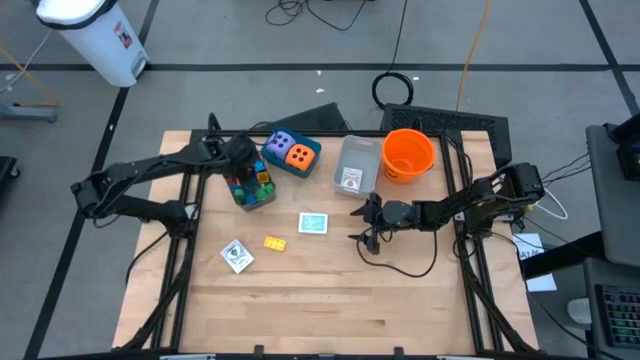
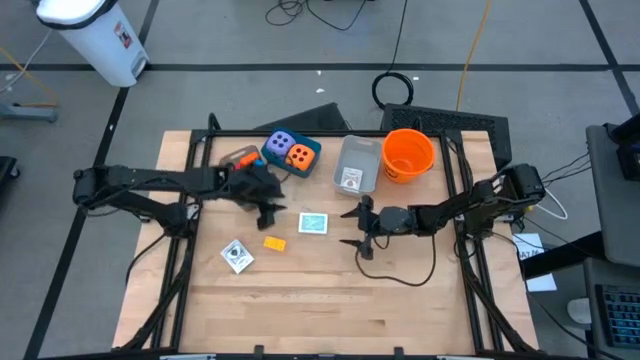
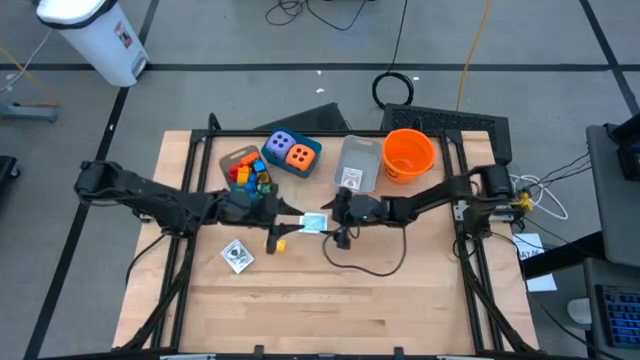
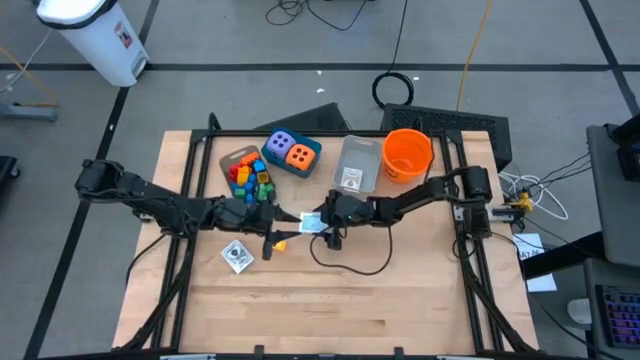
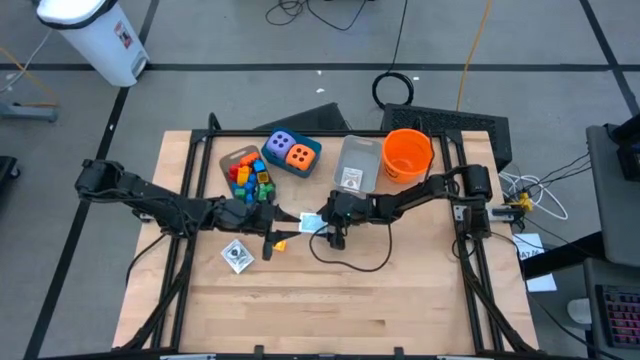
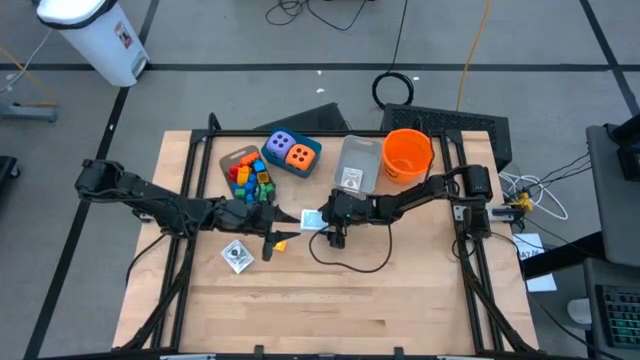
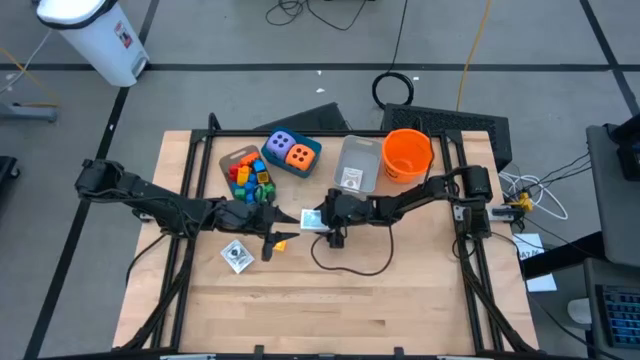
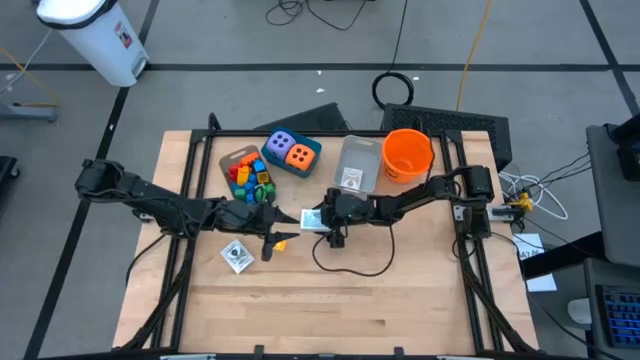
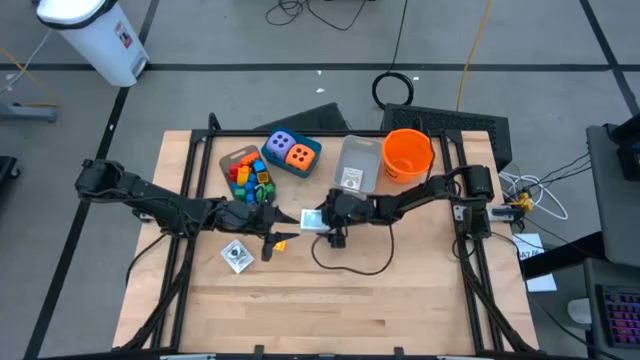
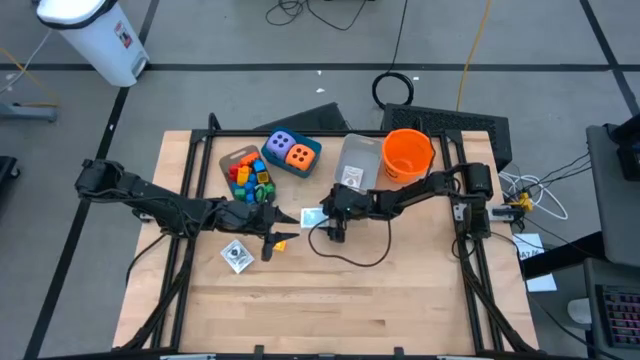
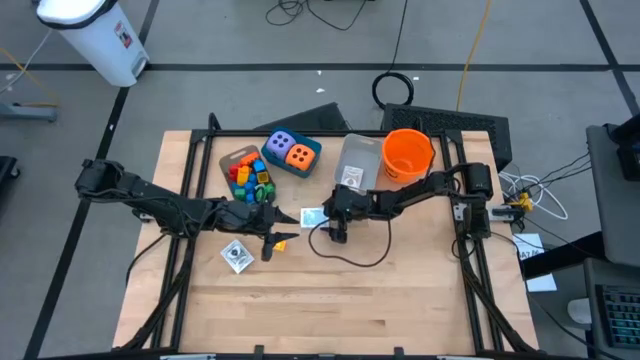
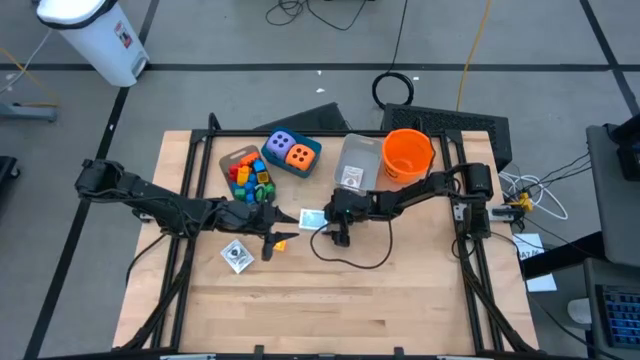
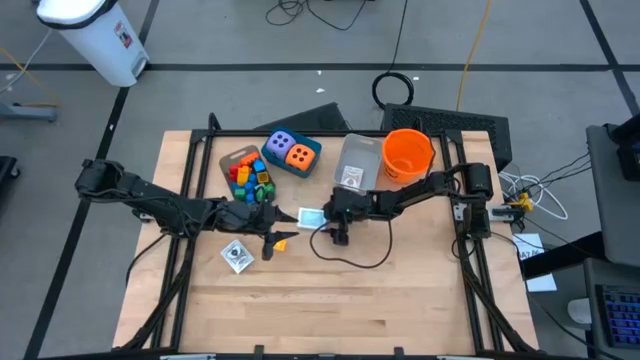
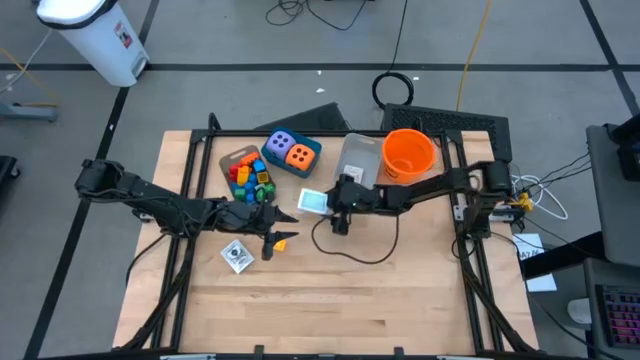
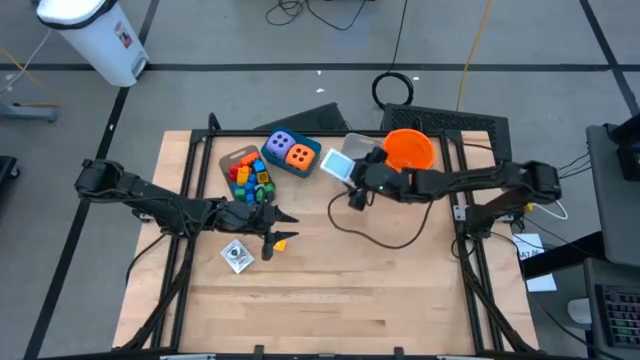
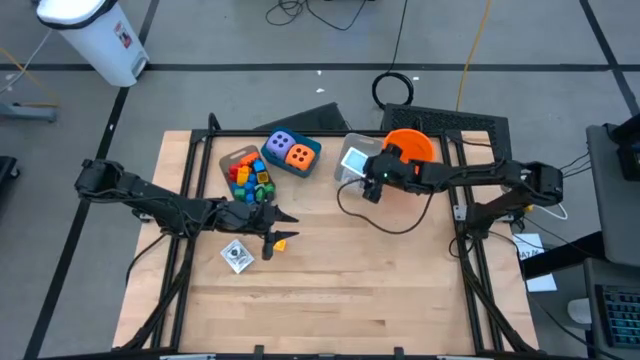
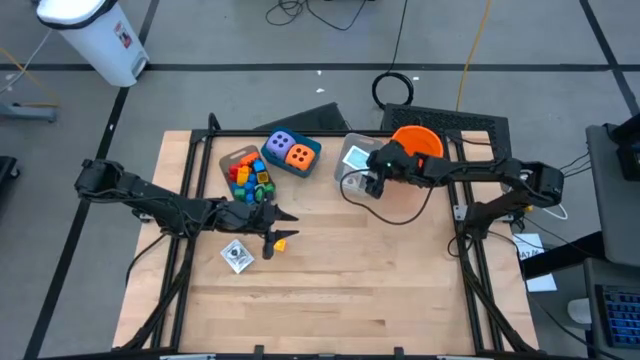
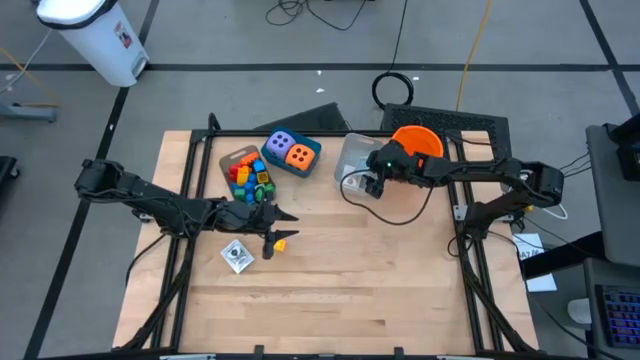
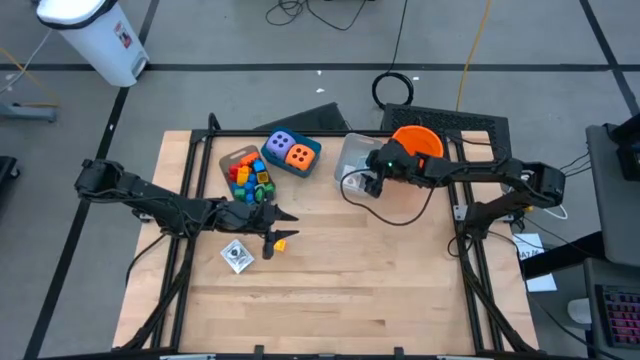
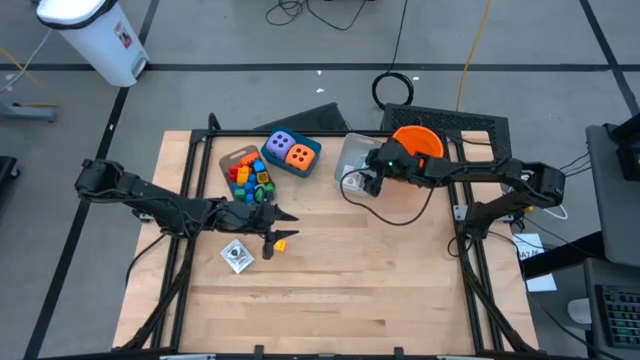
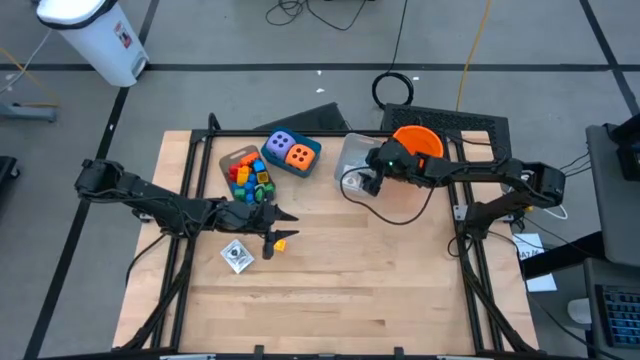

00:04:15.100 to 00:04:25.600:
Task: Pick & Place Toys
Put the blue deck of cards into the gray bin

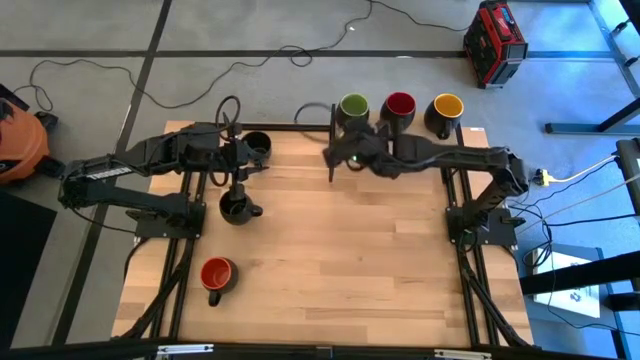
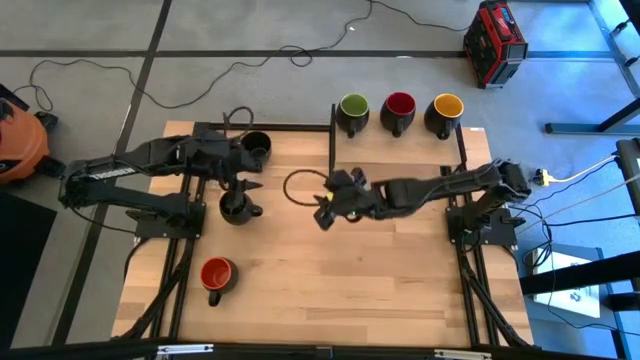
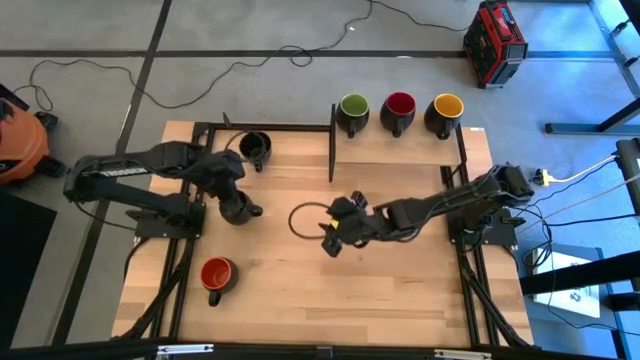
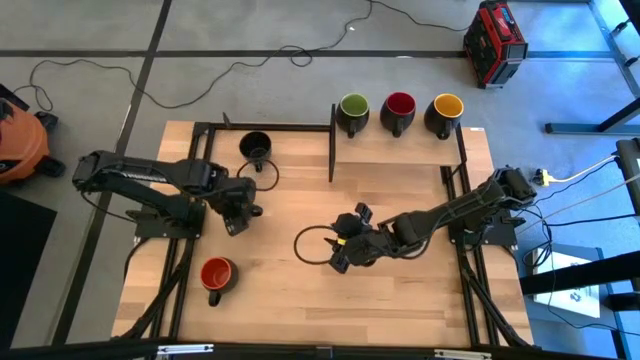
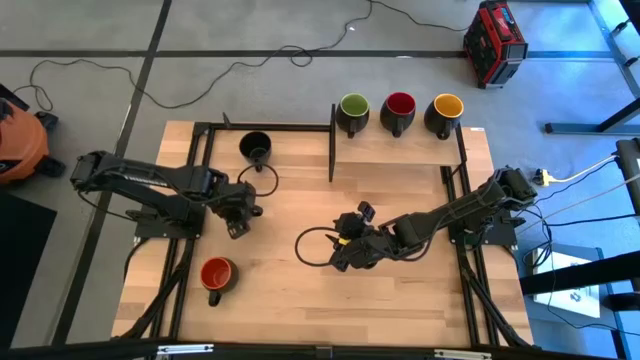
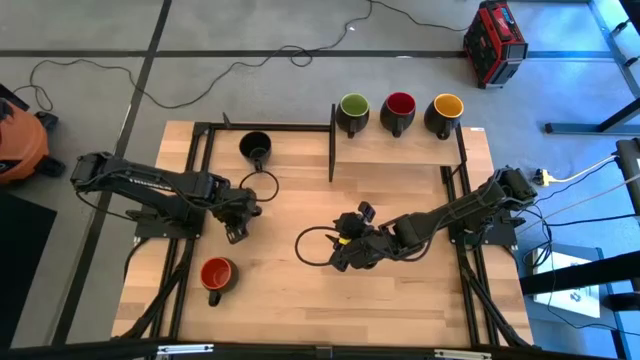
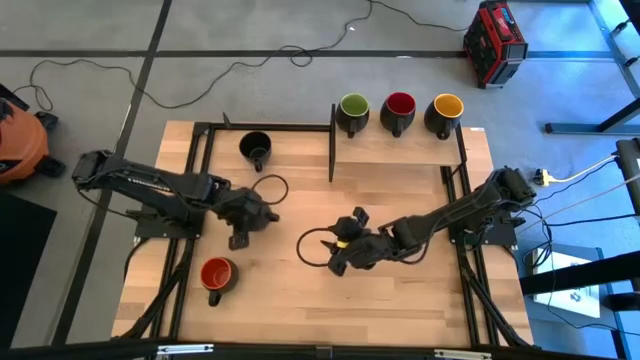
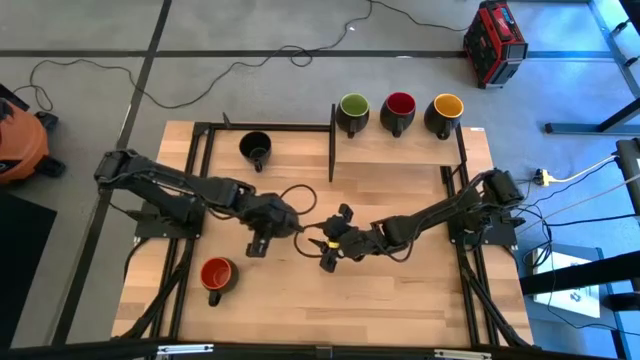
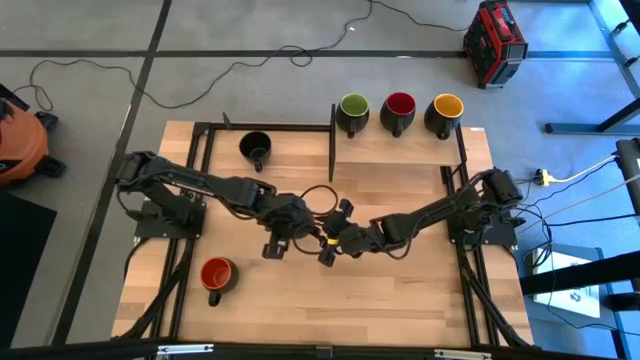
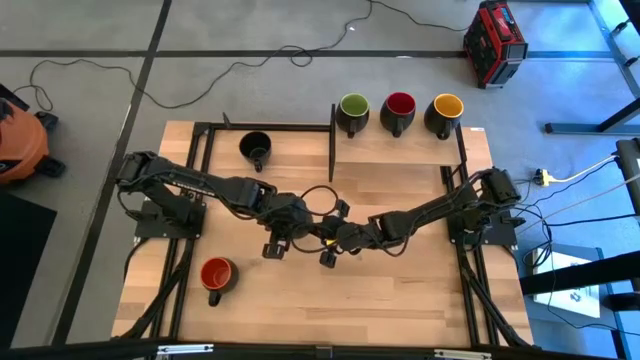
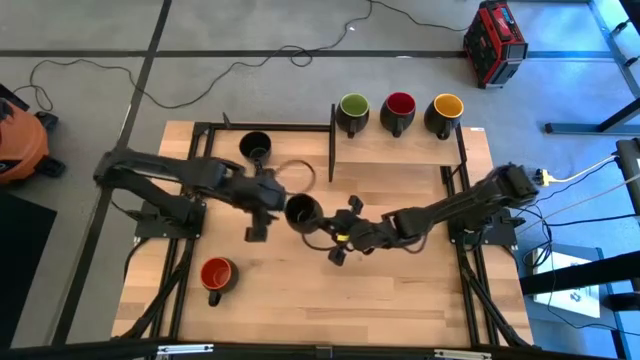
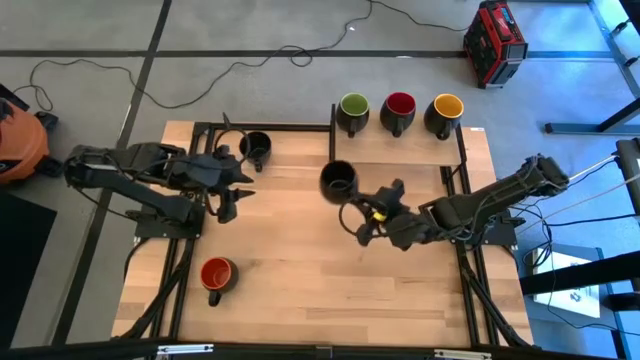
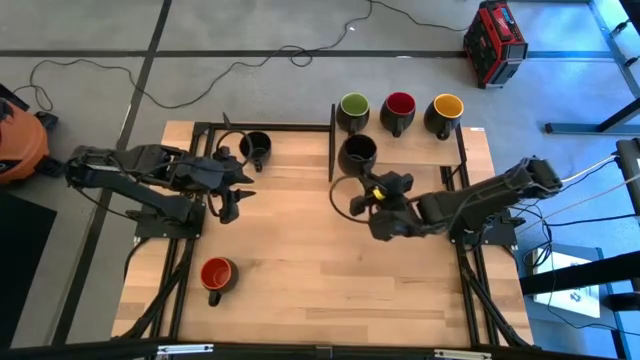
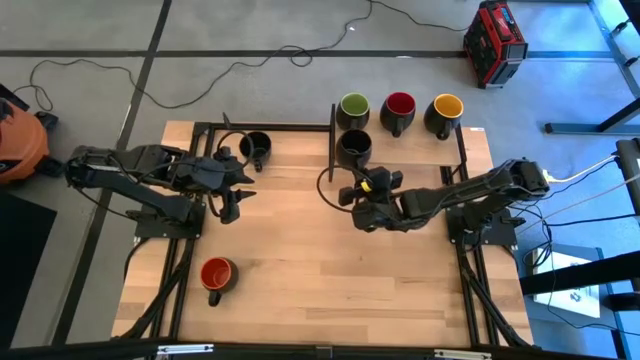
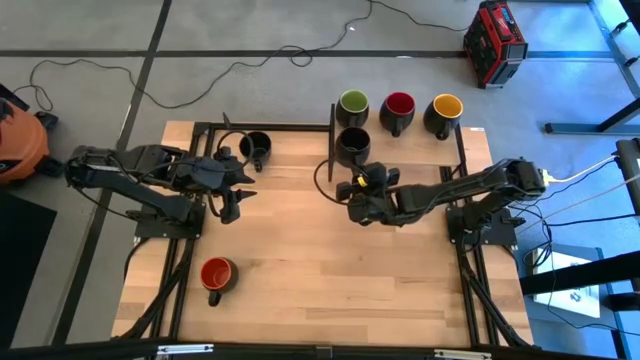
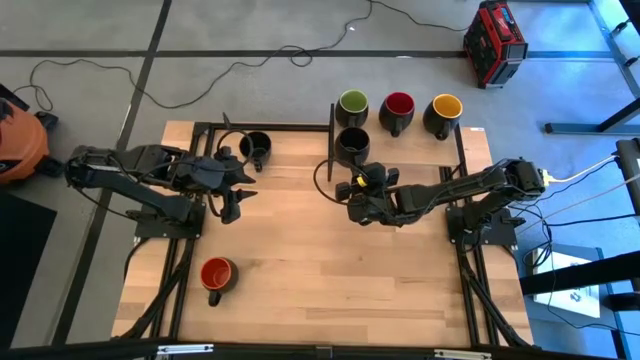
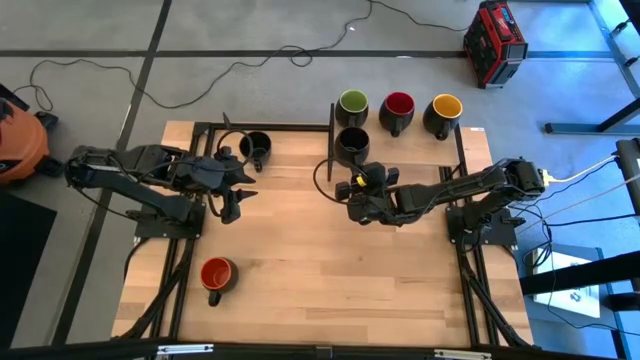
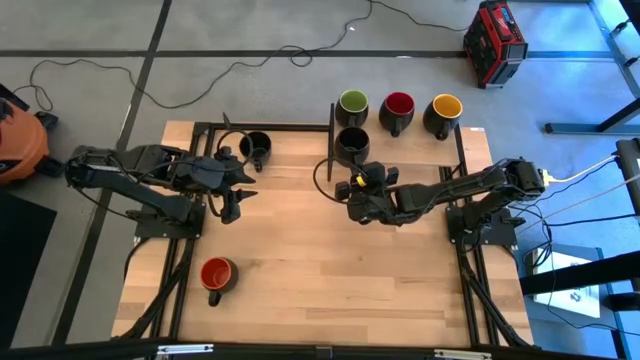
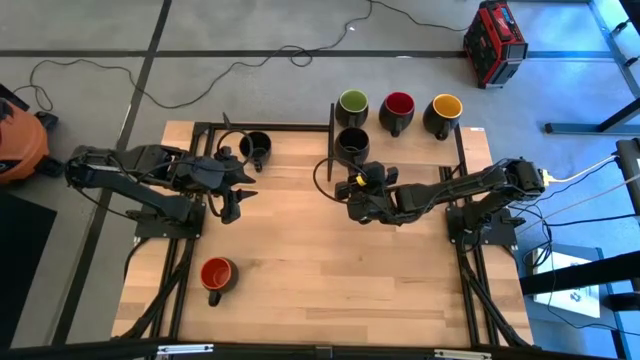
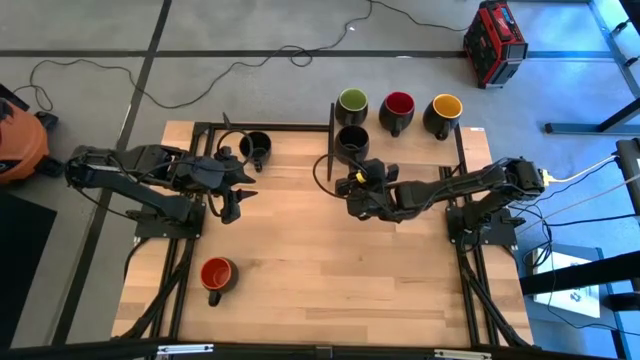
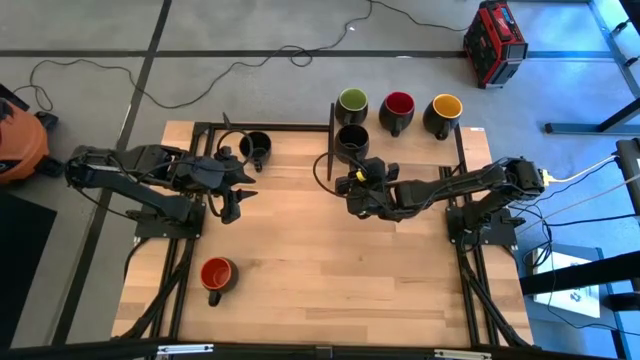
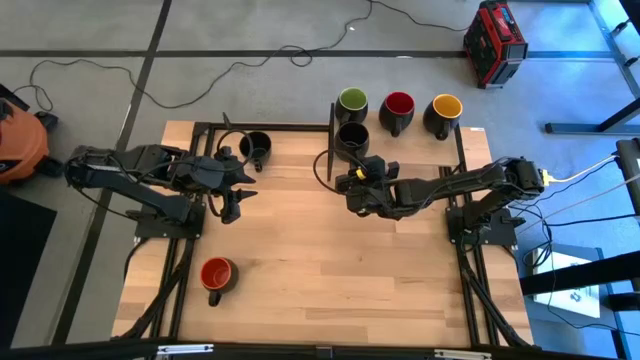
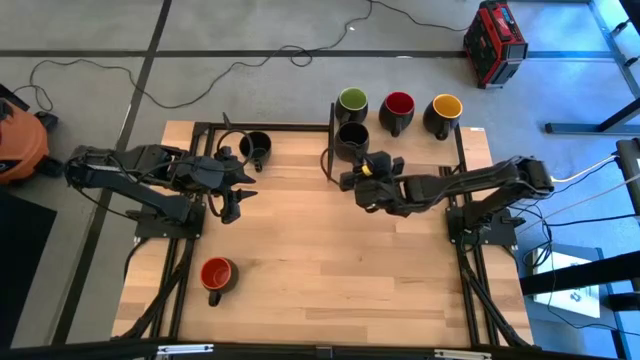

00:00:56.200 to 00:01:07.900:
Task: Place coffee mugs
Put the bottom black mug on the shelf
